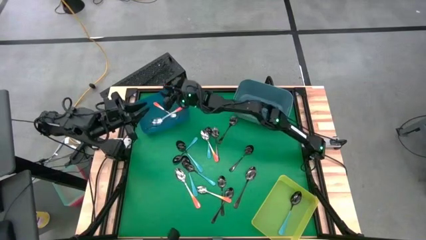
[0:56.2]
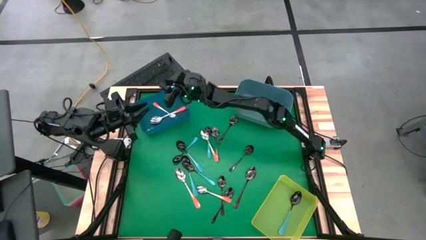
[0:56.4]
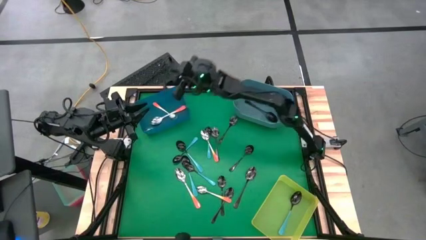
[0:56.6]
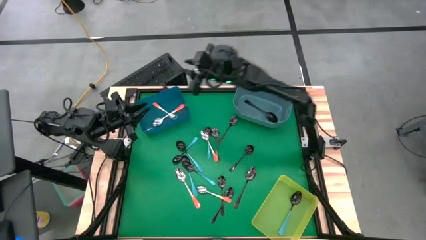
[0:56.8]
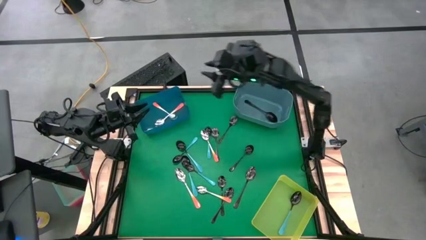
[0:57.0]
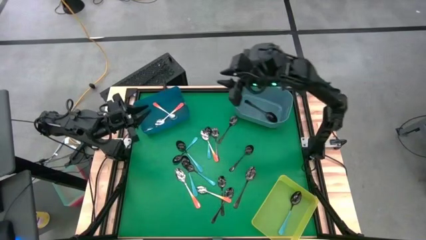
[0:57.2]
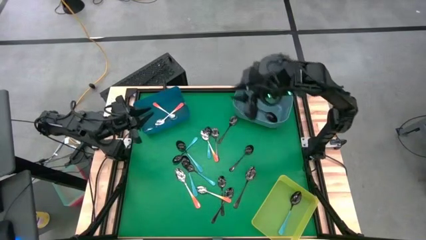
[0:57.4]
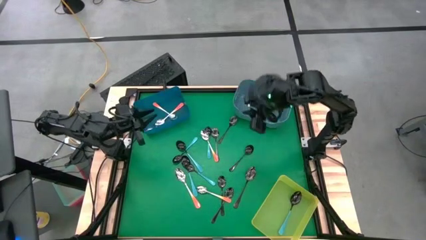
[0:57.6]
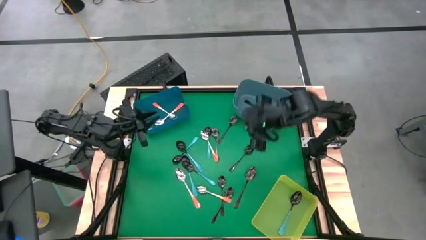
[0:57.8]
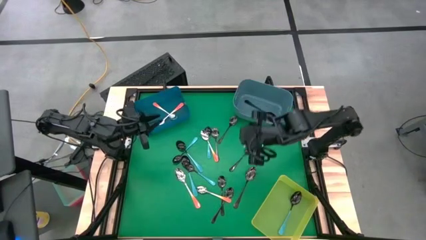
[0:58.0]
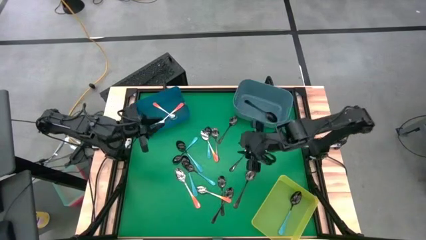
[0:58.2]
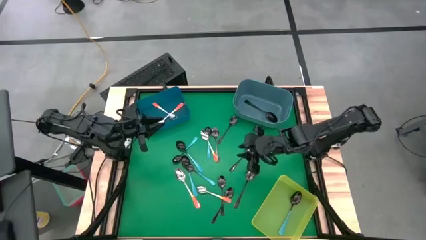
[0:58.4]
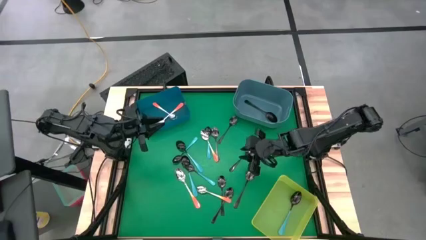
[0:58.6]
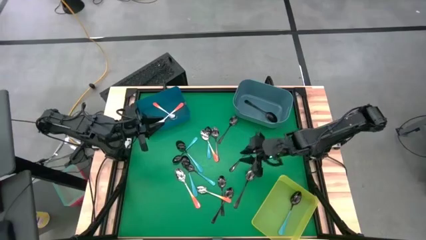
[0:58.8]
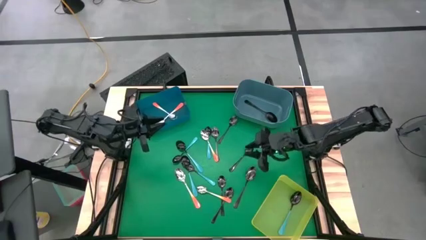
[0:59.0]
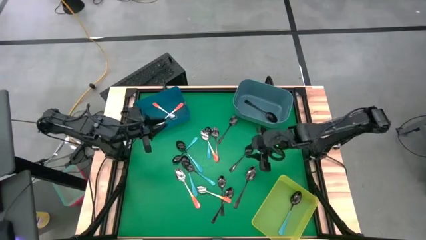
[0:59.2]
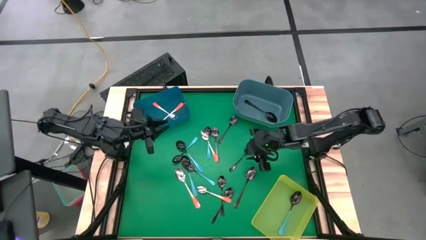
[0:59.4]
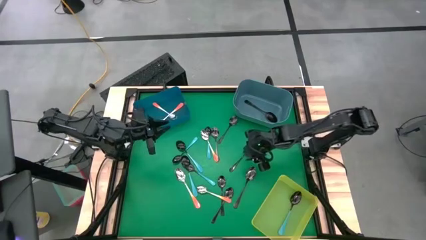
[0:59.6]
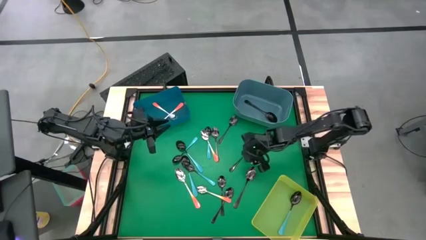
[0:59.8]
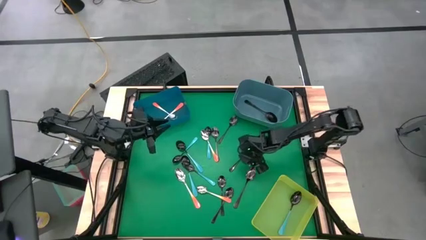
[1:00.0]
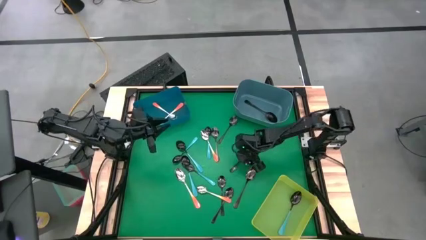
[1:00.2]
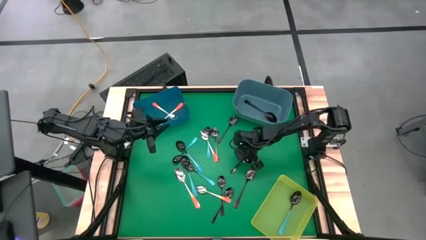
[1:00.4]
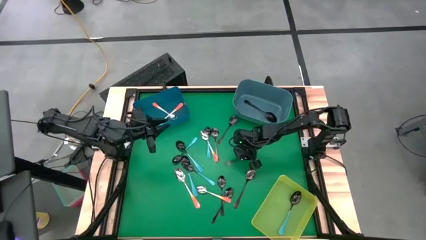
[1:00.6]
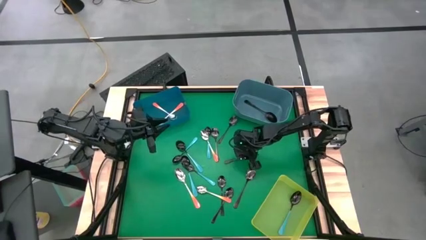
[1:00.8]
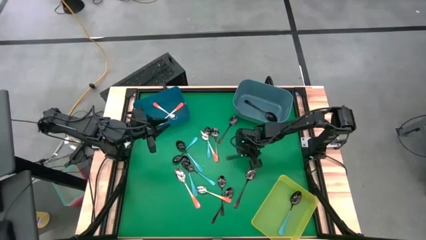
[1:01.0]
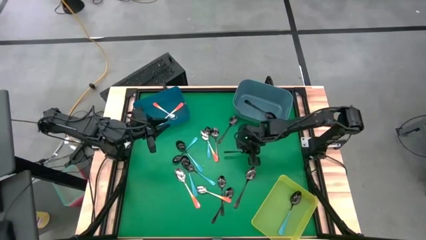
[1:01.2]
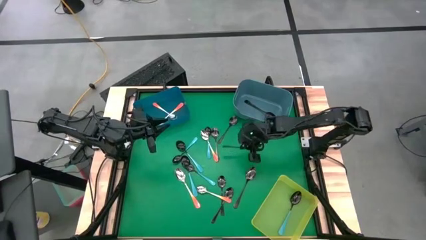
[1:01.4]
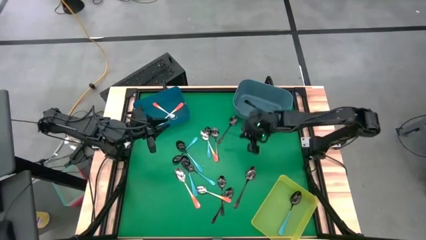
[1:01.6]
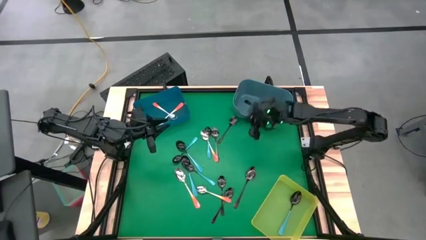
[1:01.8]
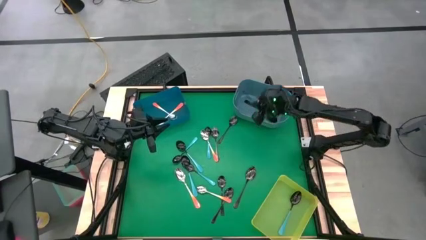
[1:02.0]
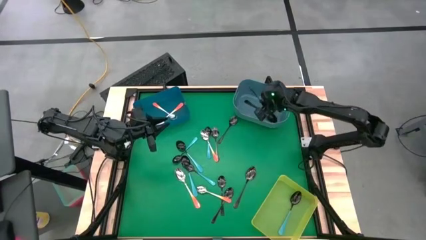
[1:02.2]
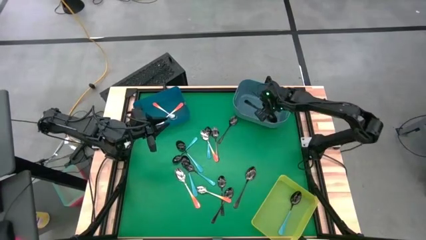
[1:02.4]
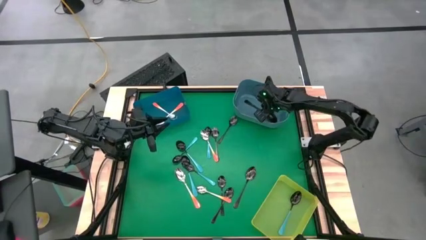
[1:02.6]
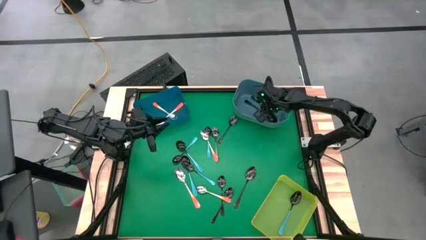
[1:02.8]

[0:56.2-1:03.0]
Task: Sort silverware by color (type)
Put the black spoon into the blue bin

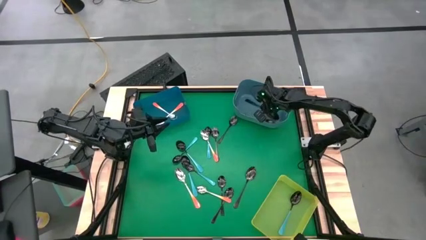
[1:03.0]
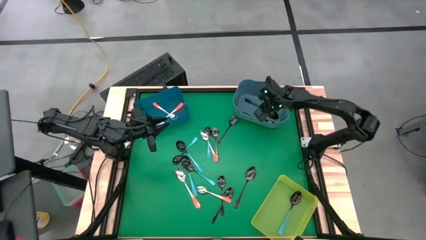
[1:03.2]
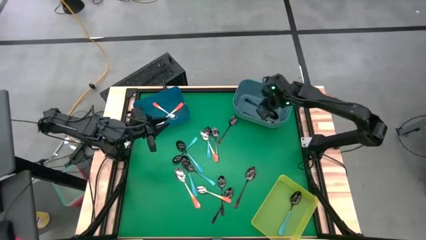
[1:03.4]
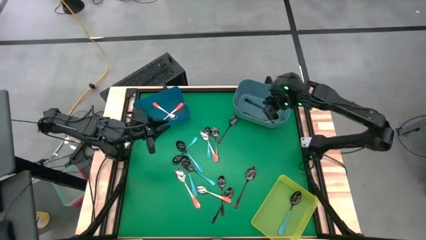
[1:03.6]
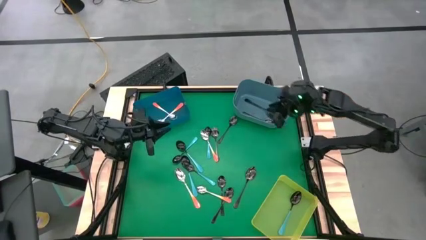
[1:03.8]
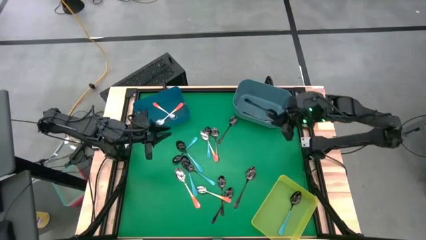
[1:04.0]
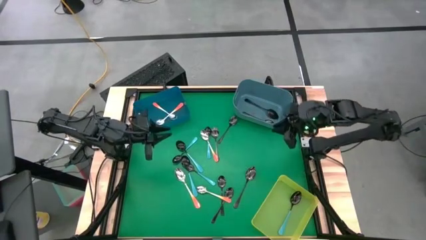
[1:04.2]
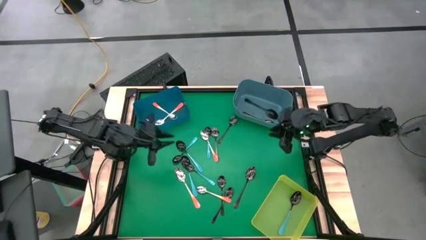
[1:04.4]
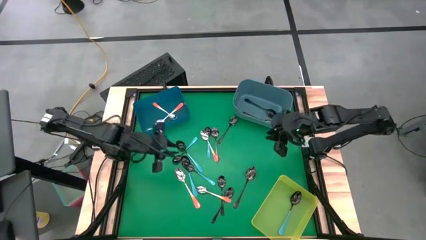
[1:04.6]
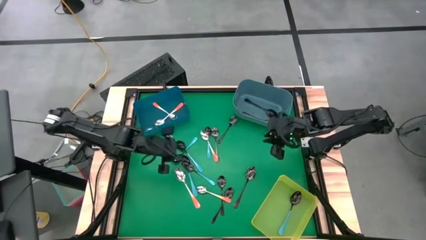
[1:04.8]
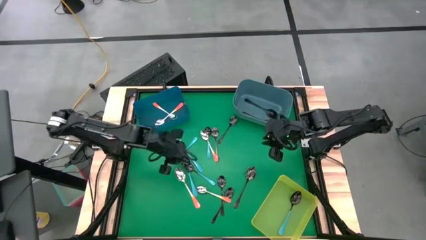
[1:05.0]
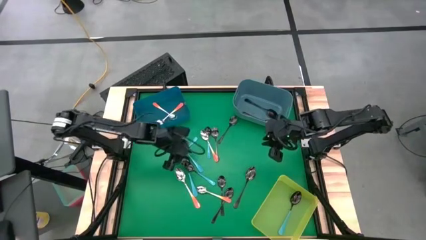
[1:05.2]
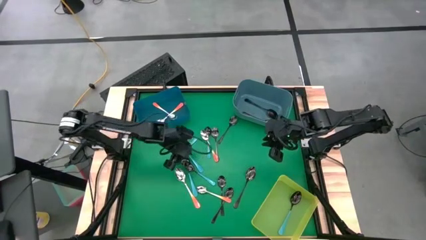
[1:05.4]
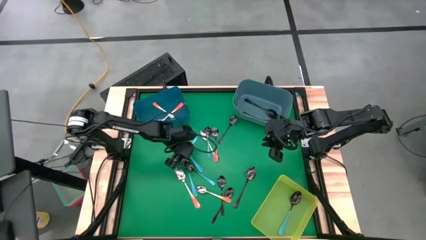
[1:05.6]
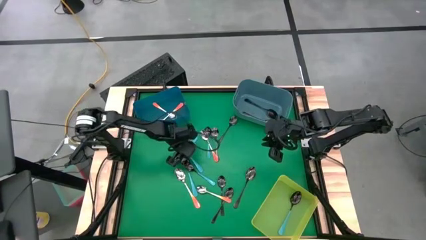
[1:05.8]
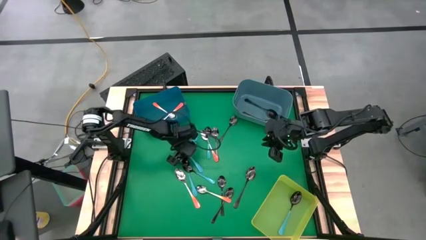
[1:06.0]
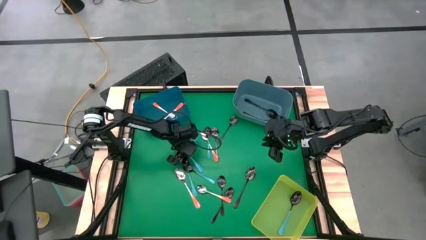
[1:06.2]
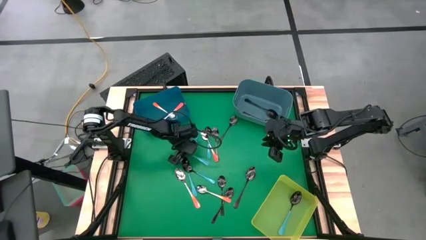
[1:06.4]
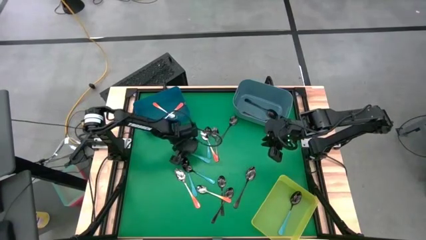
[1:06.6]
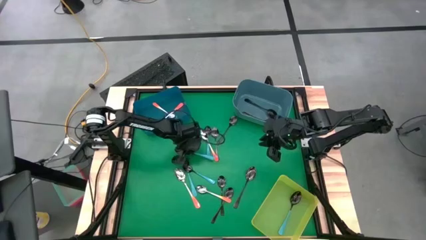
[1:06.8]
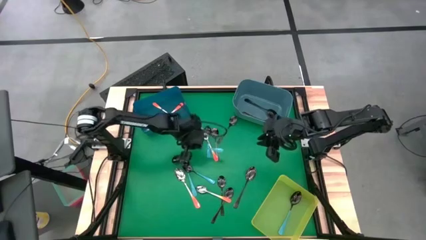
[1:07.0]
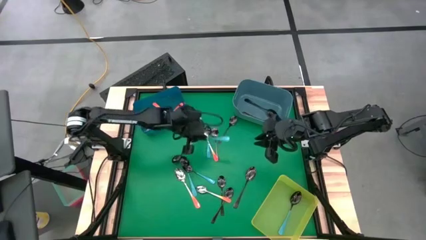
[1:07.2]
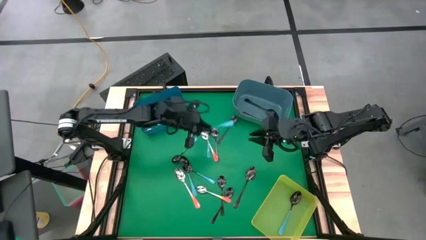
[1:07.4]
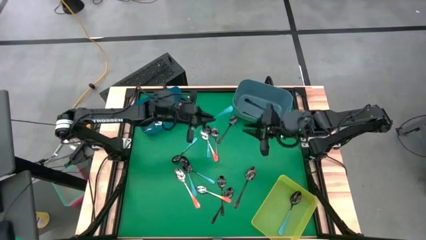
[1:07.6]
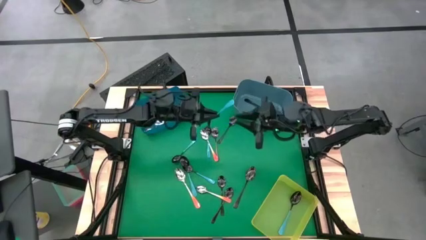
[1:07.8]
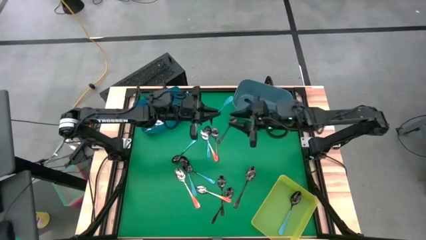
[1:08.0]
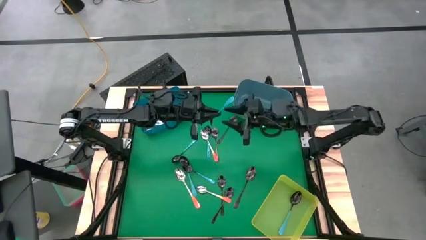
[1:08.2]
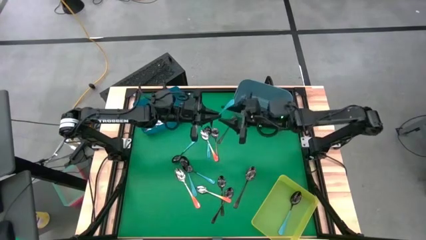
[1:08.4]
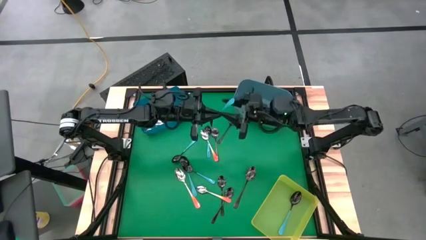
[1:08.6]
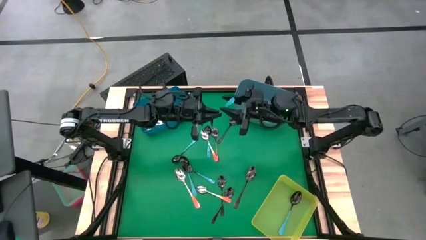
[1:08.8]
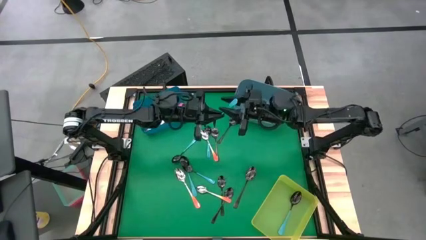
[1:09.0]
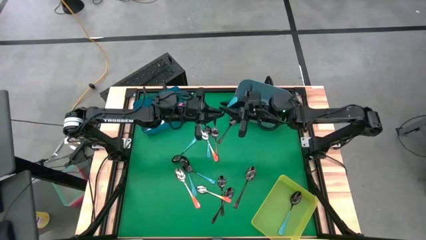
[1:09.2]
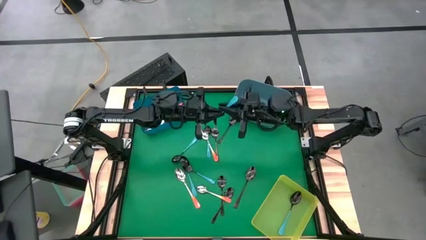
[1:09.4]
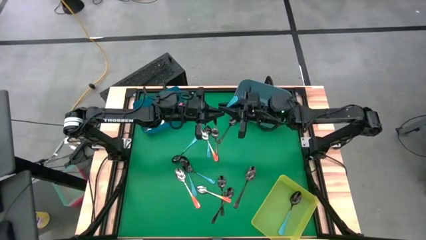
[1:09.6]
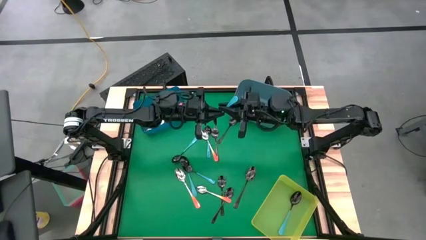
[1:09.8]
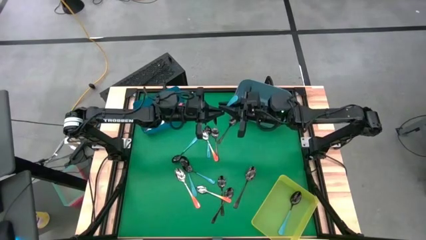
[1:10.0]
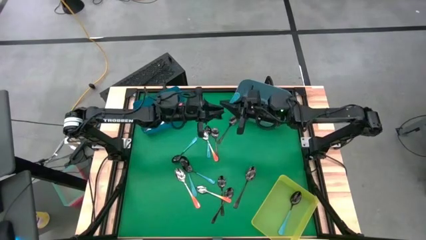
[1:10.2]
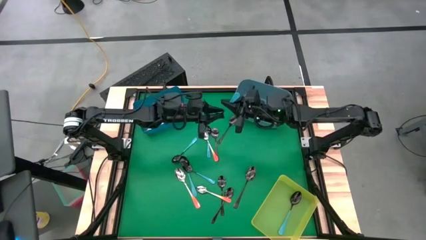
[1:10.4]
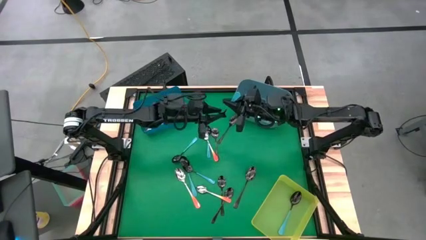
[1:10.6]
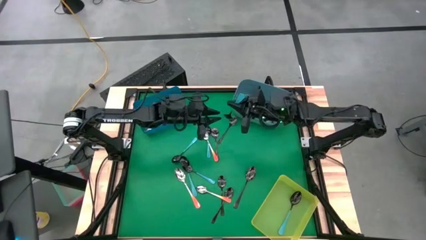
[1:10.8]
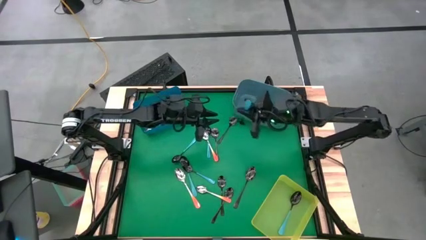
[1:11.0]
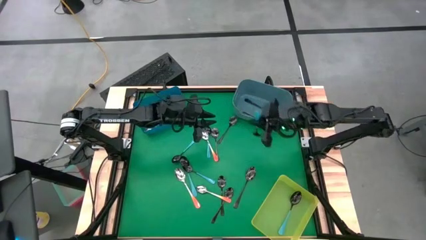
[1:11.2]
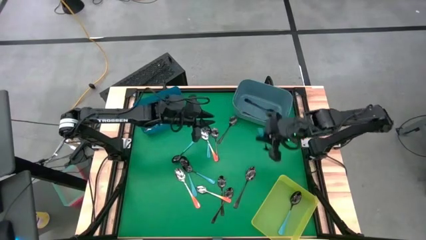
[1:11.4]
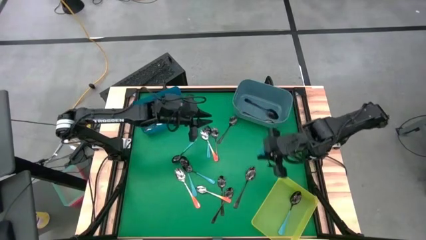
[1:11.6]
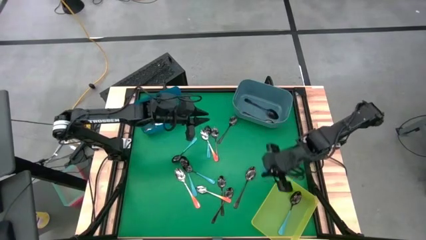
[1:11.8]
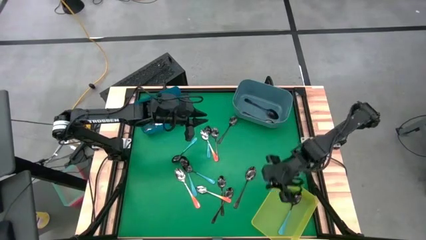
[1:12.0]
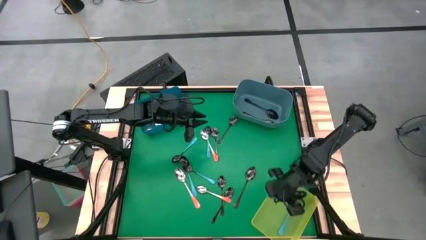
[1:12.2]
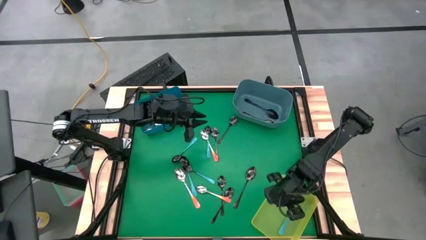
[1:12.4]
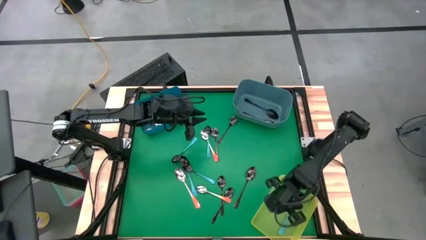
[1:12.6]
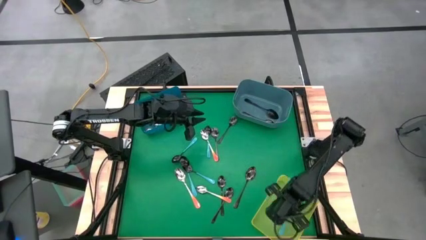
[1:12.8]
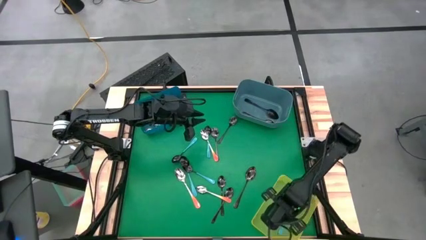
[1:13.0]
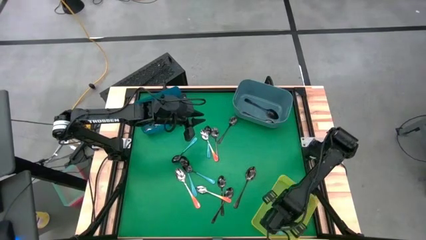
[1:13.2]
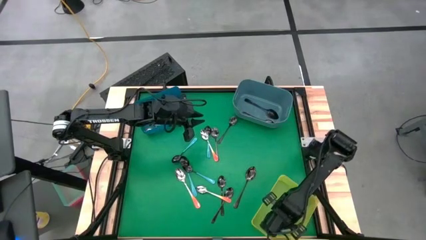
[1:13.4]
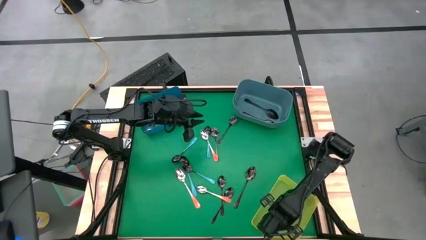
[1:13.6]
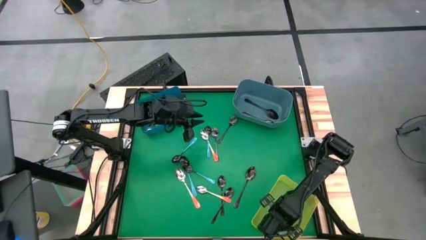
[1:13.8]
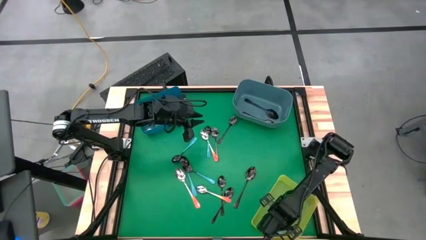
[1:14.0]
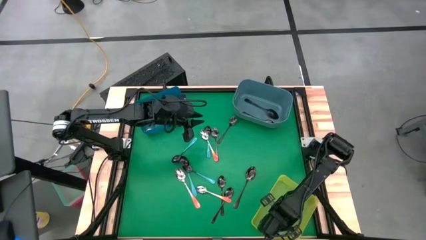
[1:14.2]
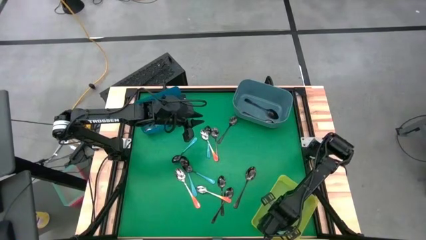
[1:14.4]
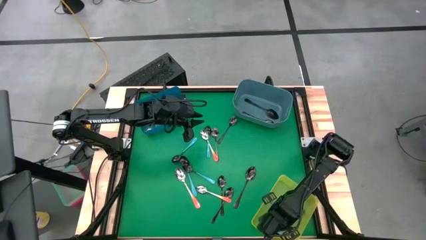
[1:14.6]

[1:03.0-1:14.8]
Put the blue spoon into the yellow bin
